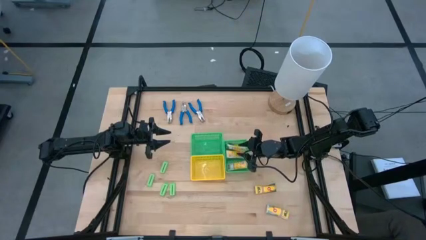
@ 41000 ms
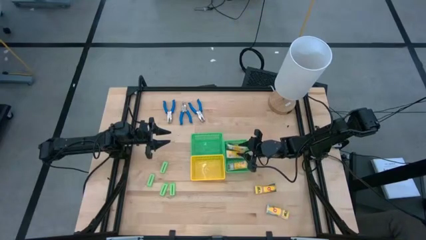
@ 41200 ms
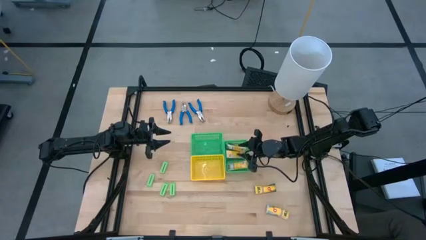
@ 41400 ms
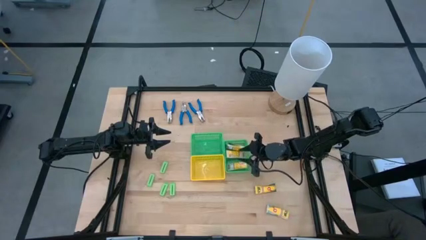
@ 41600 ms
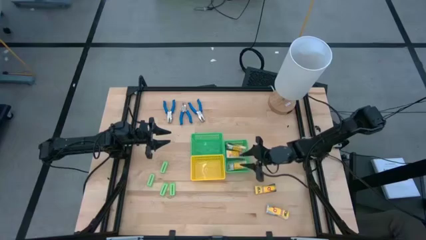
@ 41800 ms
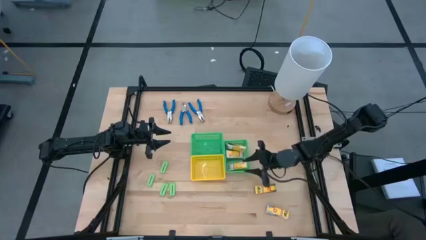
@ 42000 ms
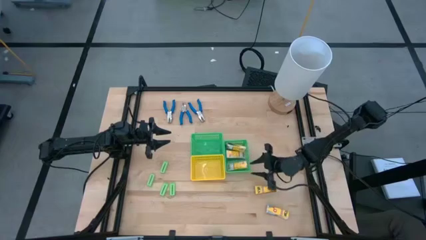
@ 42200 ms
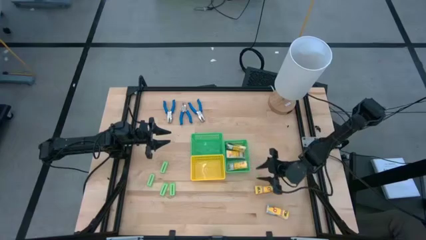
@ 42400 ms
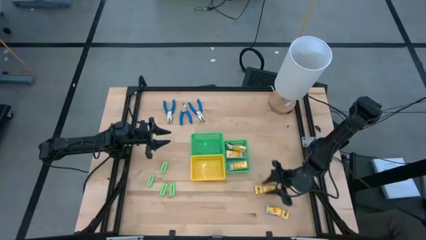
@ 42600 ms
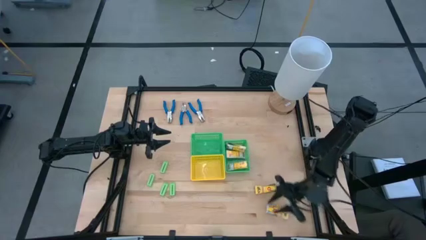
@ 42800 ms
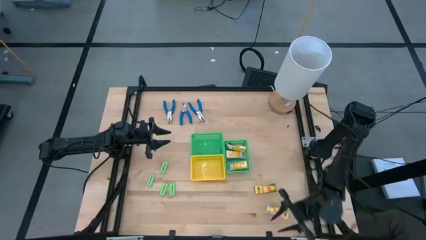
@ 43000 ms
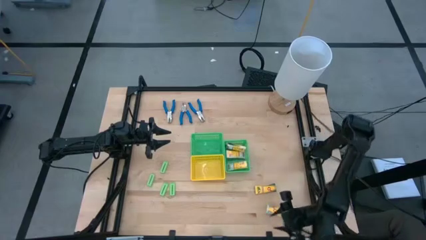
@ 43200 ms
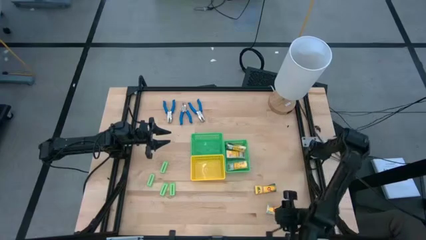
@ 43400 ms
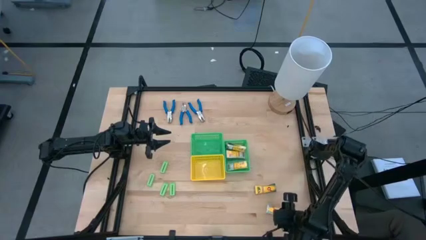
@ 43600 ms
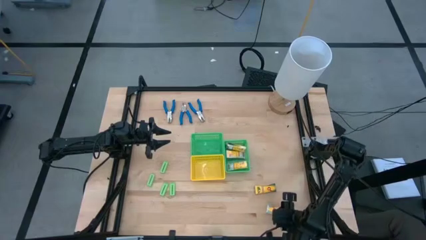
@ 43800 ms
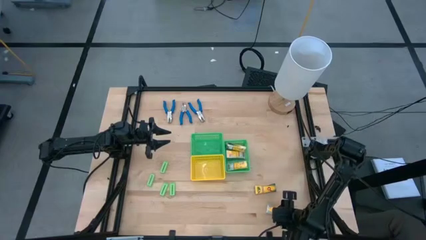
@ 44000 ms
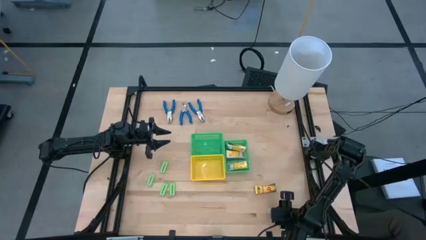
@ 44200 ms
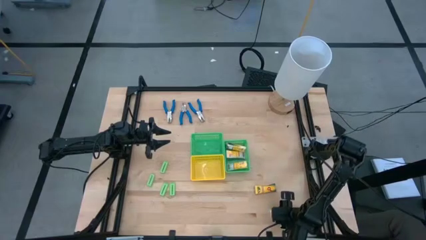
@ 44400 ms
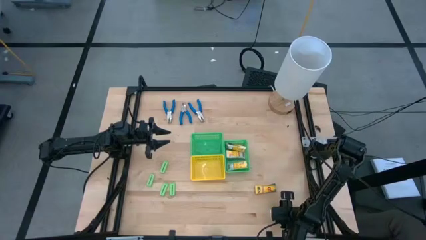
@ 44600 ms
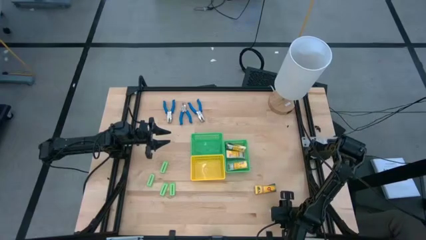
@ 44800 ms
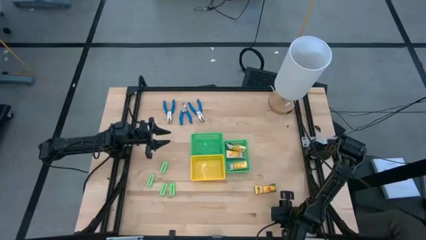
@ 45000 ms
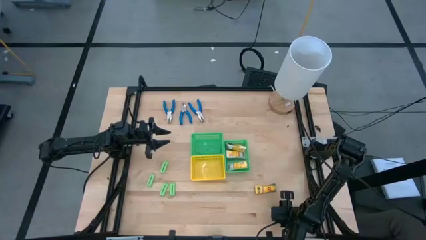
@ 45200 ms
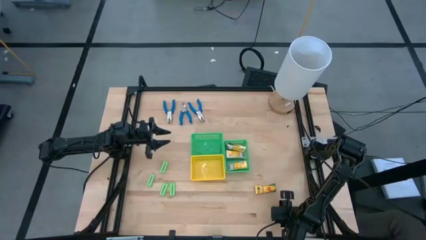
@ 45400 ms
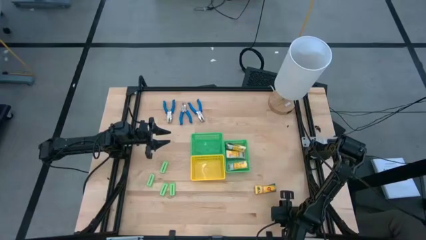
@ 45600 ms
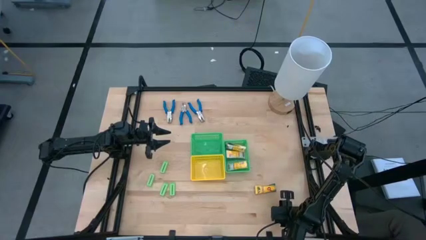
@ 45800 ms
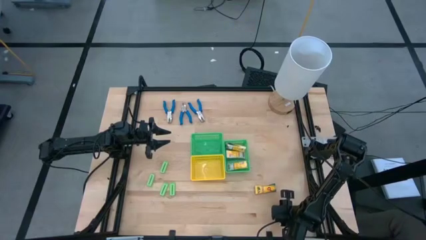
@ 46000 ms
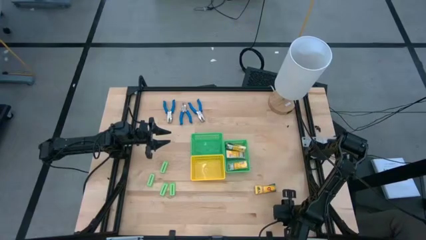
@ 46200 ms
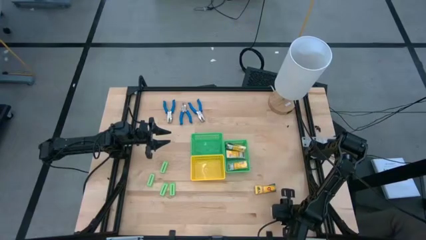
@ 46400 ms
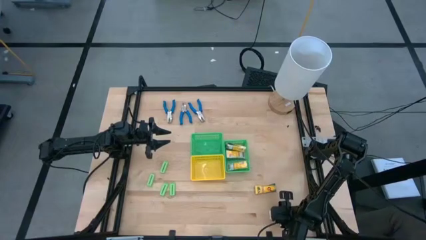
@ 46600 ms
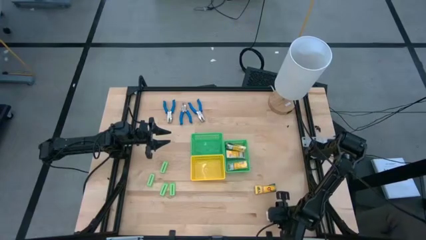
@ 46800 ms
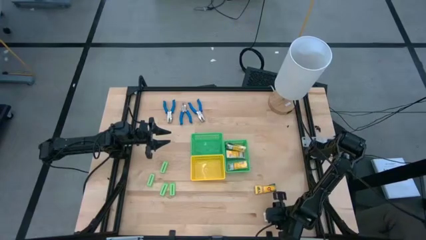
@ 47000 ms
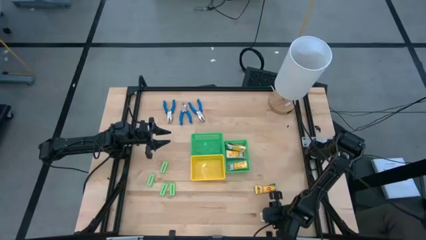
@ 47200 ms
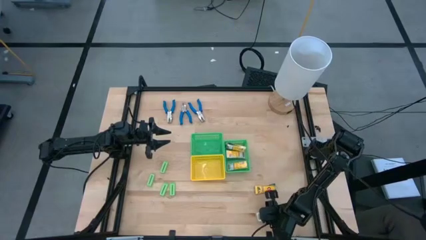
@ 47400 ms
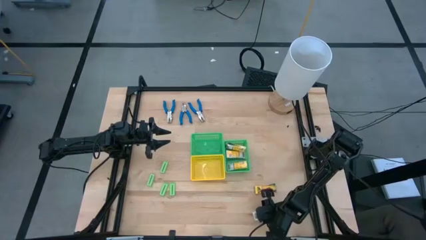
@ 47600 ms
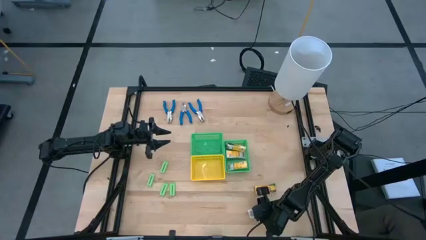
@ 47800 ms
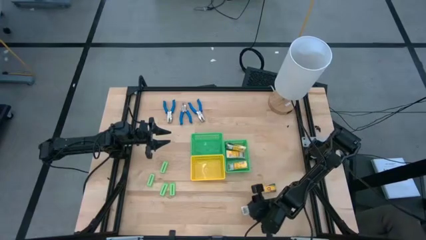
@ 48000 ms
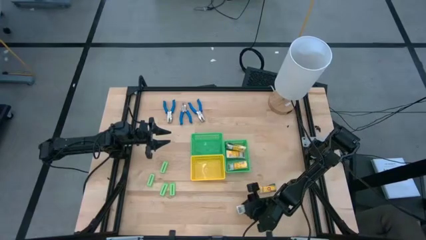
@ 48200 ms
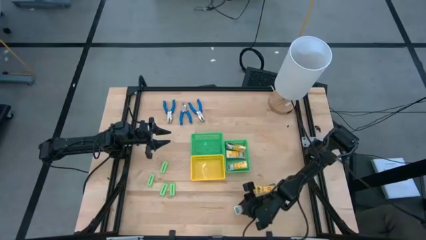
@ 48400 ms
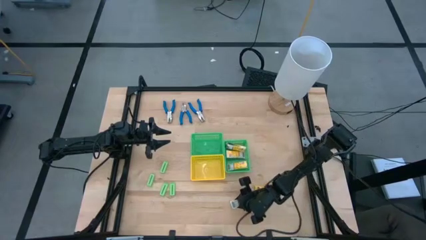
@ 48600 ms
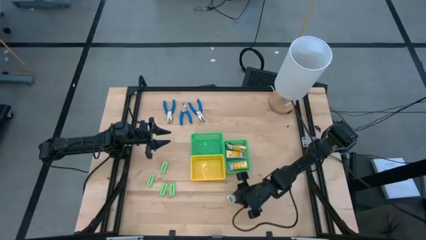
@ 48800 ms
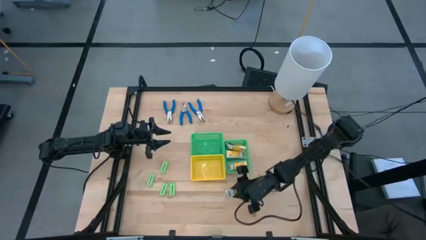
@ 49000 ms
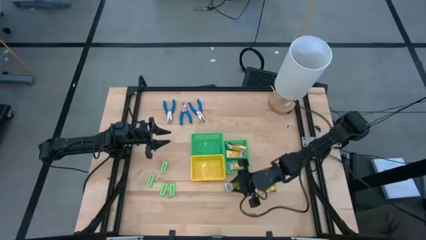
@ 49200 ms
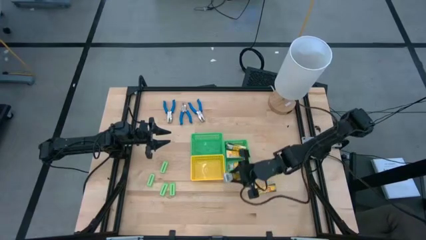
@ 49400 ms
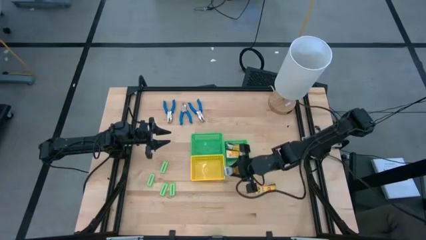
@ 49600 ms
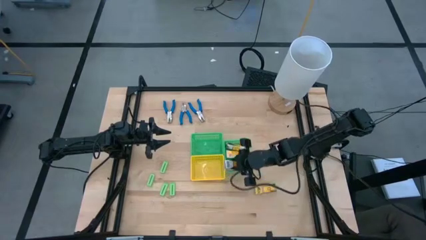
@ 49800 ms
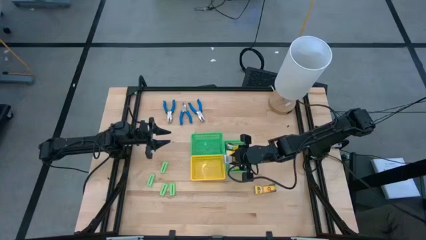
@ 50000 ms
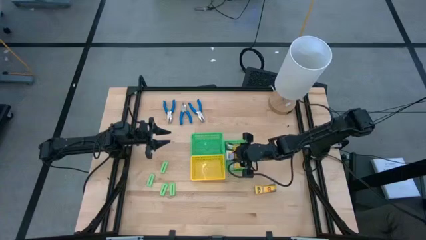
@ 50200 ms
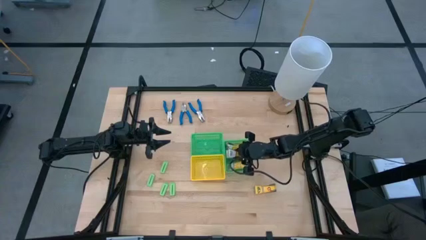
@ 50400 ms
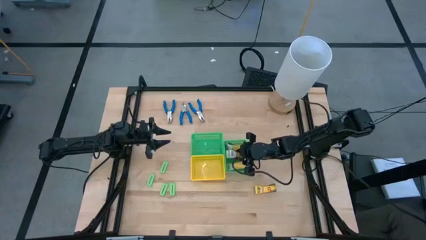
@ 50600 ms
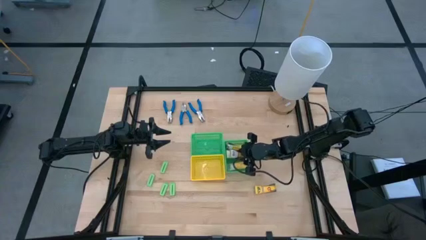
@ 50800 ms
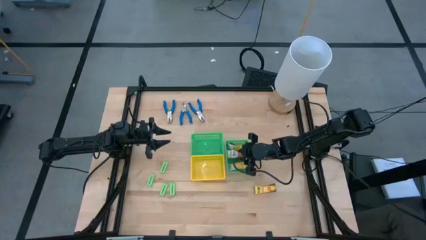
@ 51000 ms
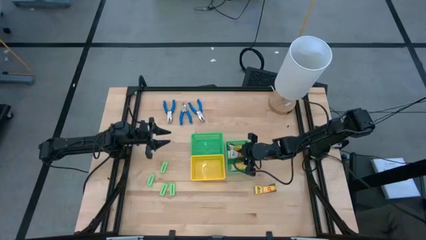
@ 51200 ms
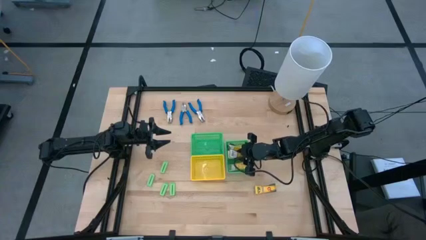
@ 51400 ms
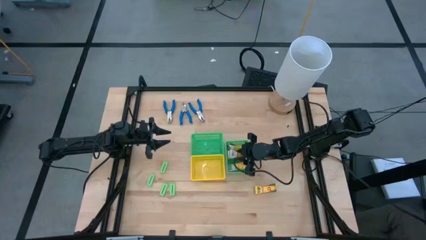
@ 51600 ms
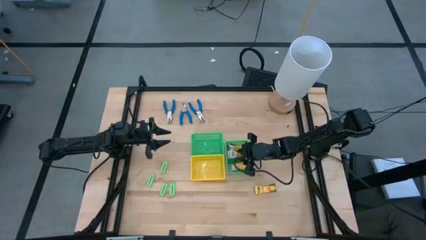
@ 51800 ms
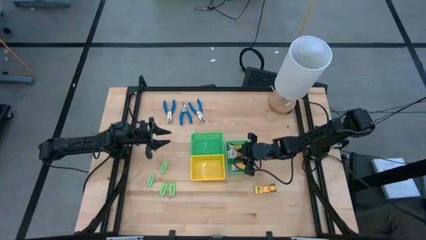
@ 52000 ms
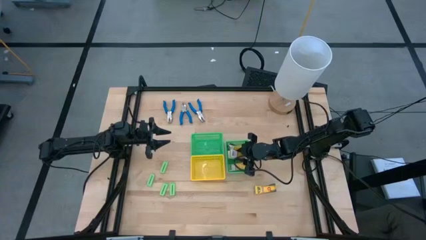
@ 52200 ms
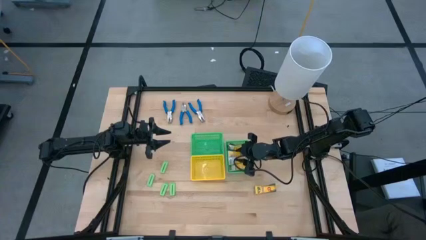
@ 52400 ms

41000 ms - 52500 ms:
Task: Pick & Place School Supplies
Put the yellow crayon box into the right green bin
